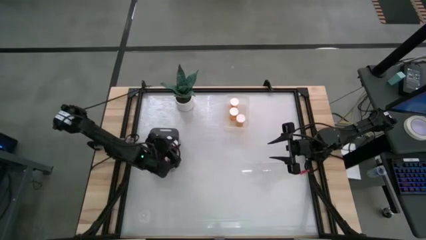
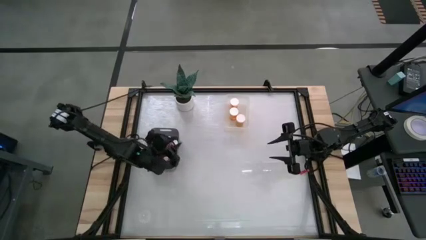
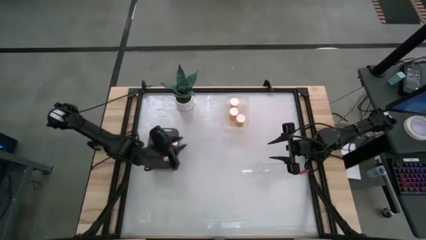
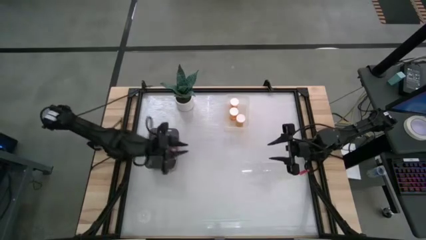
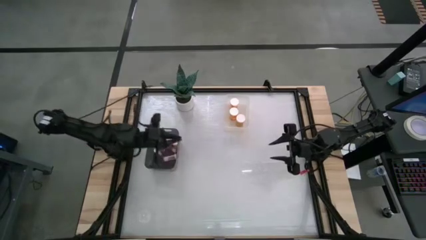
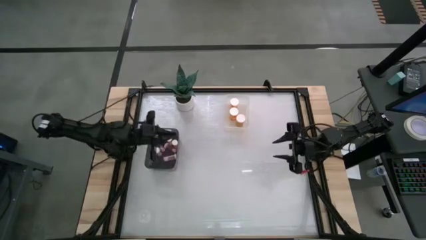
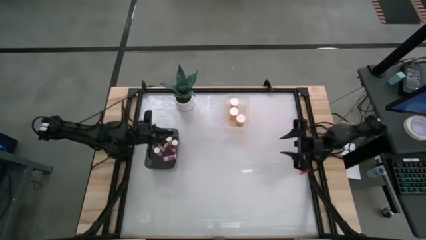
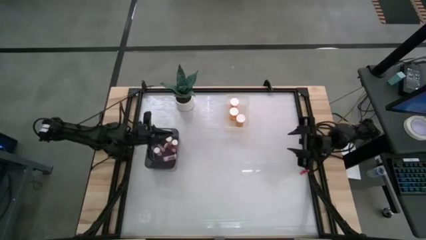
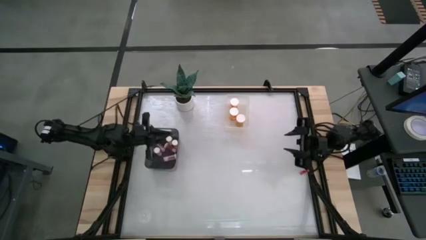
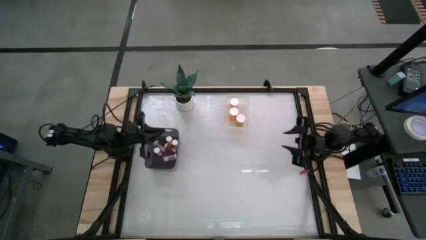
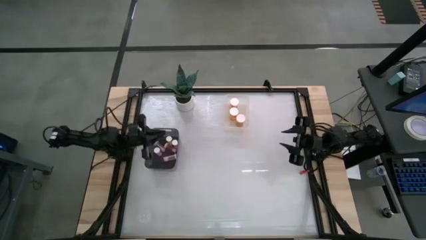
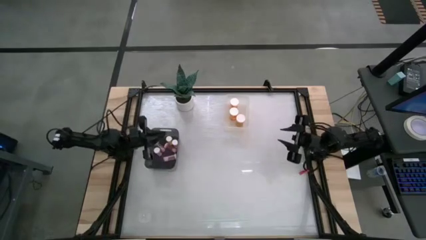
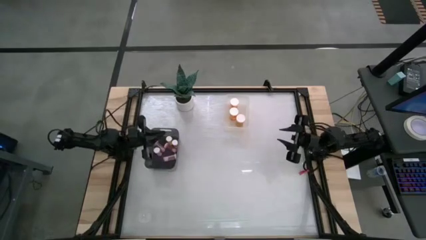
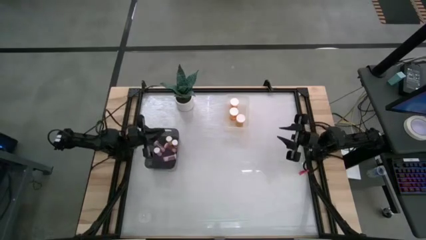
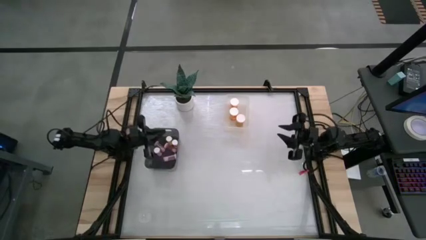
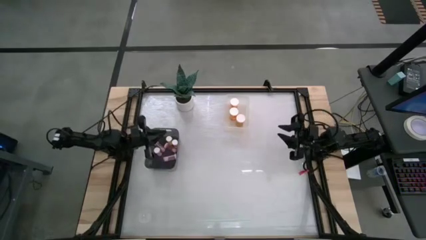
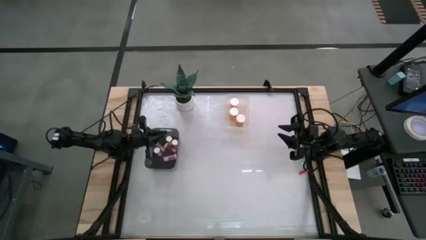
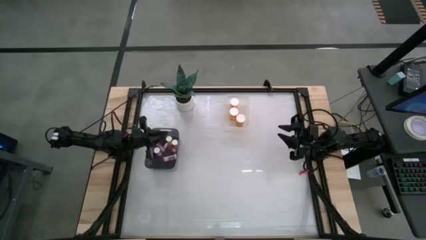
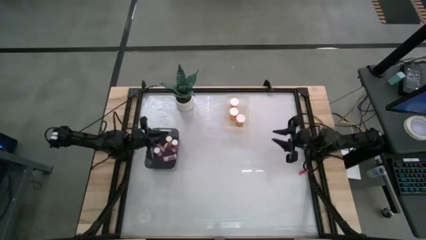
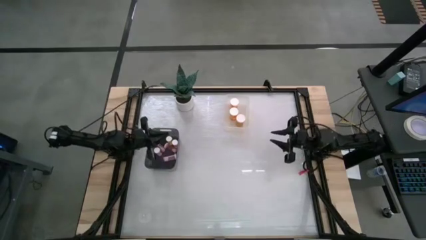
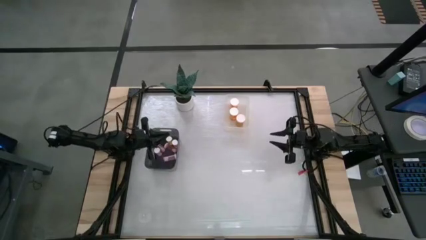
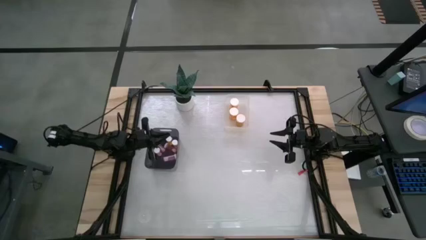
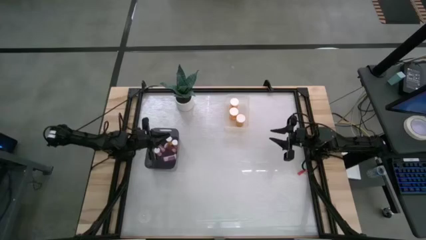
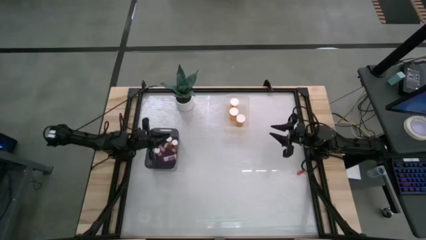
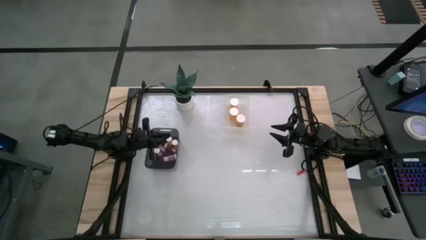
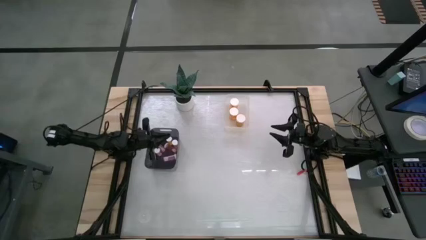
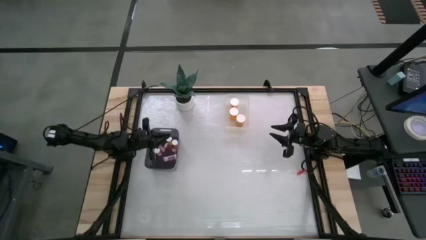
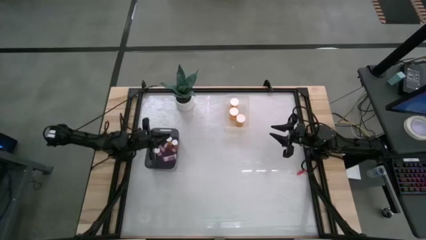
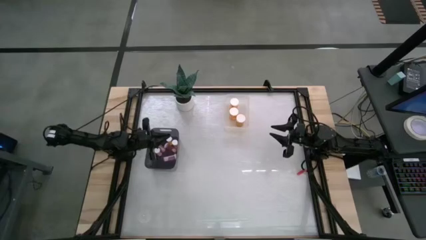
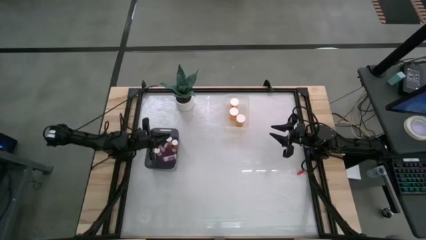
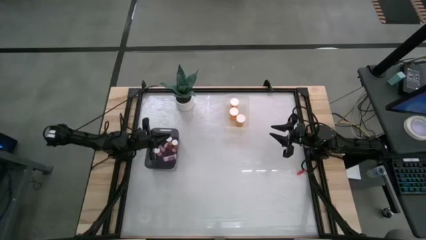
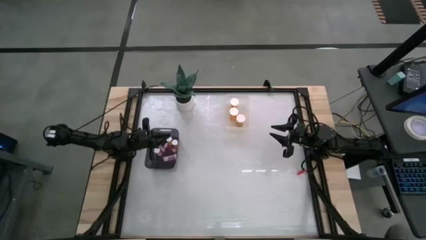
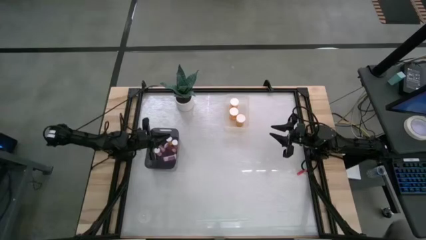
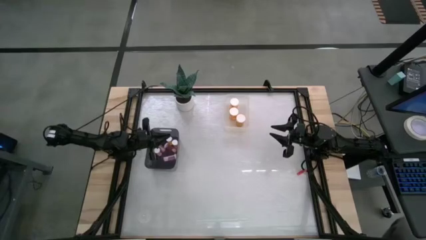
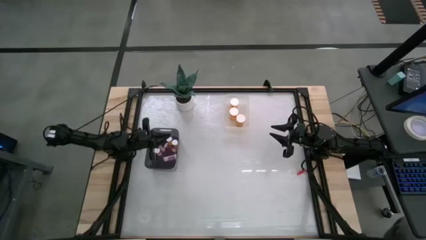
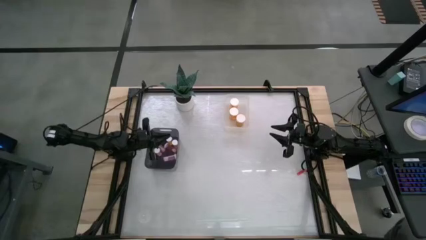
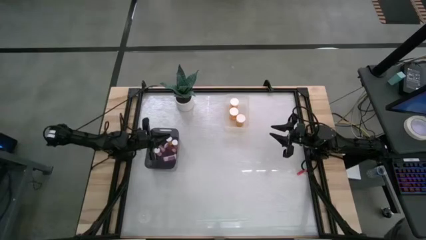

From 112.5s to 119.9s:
Task: Pick and place medicine bottles into bin by pill shape (circle, oval)
Return to Home Position
